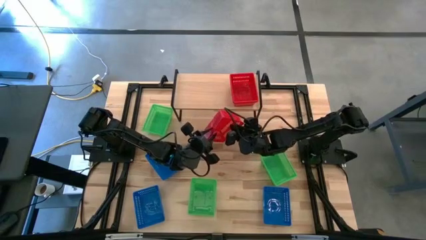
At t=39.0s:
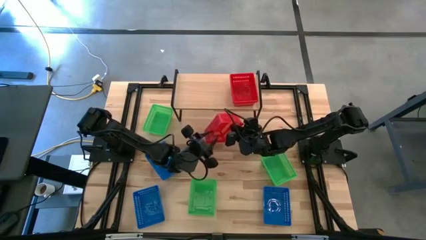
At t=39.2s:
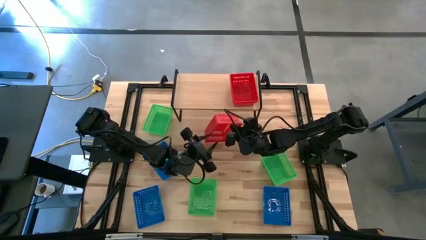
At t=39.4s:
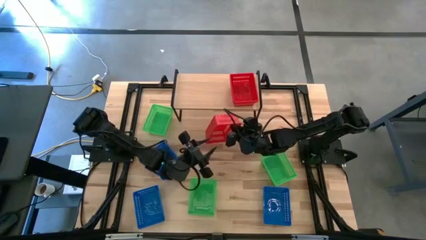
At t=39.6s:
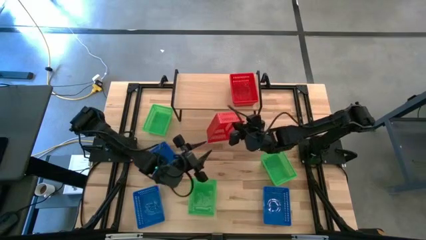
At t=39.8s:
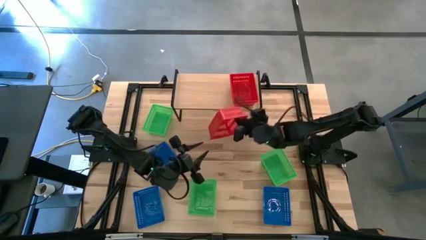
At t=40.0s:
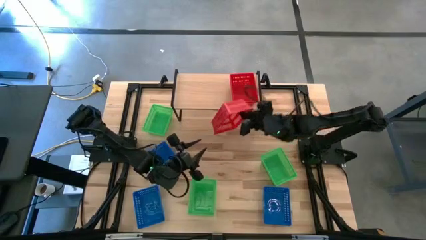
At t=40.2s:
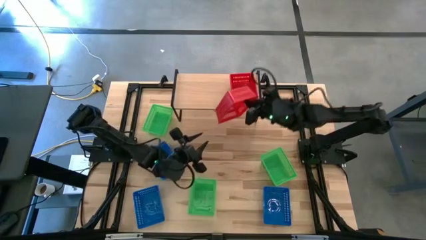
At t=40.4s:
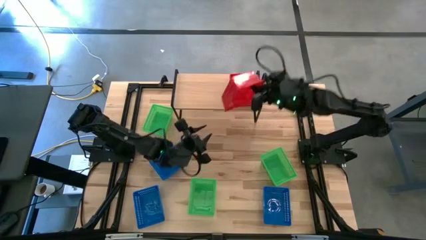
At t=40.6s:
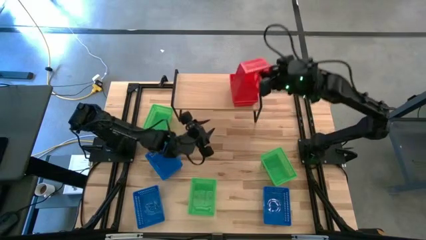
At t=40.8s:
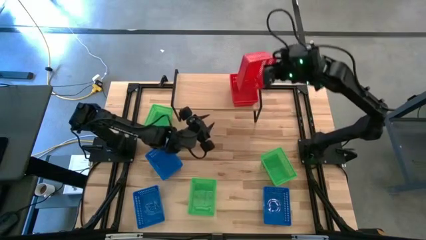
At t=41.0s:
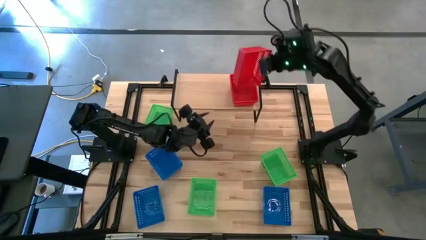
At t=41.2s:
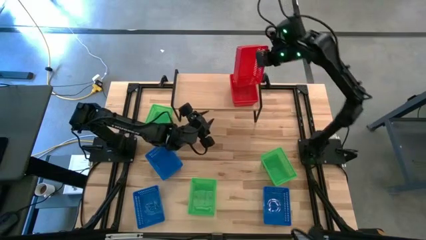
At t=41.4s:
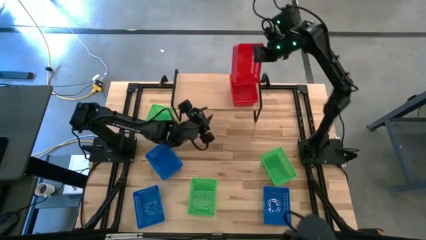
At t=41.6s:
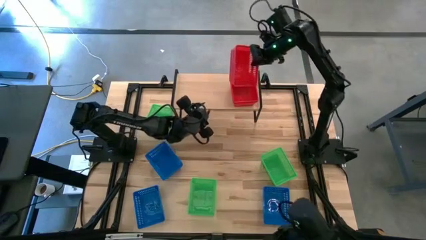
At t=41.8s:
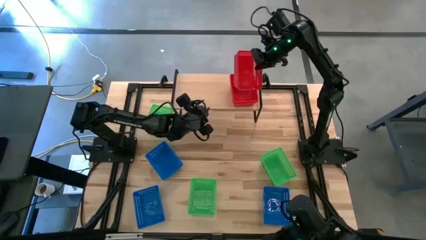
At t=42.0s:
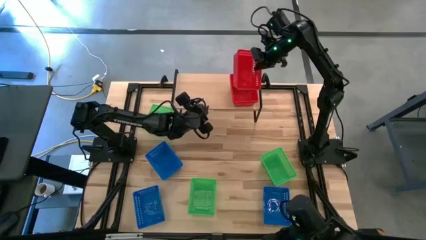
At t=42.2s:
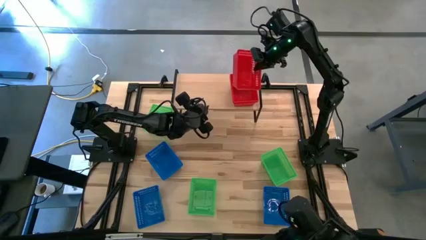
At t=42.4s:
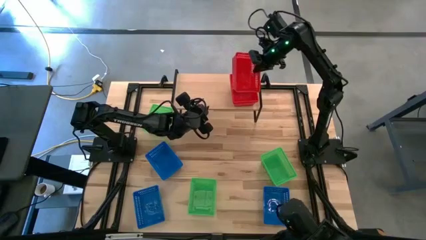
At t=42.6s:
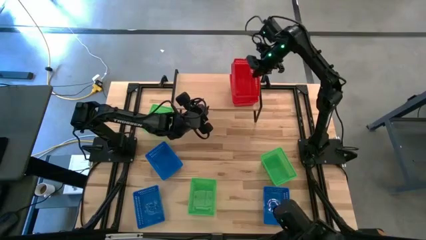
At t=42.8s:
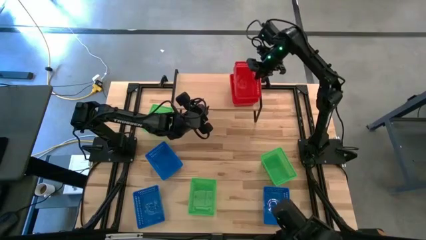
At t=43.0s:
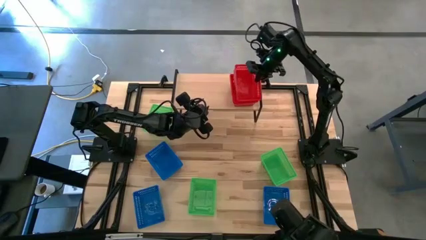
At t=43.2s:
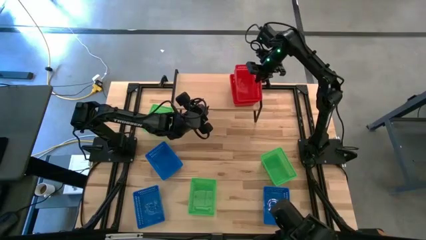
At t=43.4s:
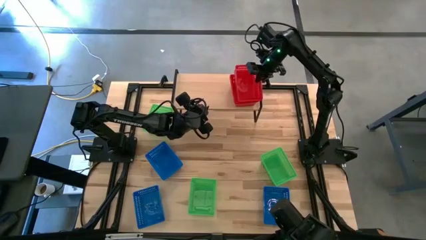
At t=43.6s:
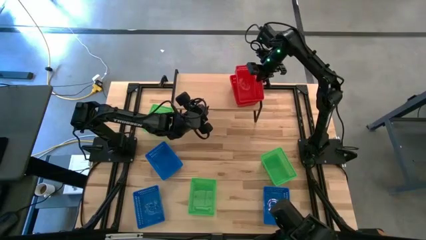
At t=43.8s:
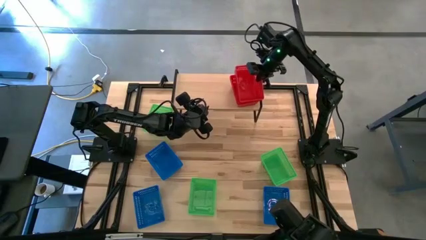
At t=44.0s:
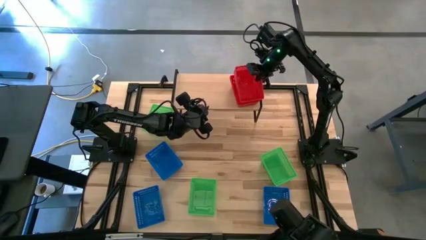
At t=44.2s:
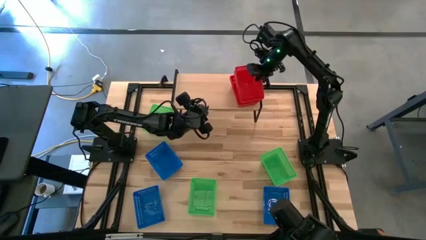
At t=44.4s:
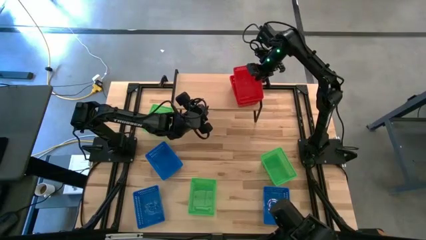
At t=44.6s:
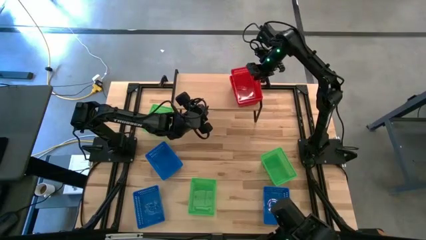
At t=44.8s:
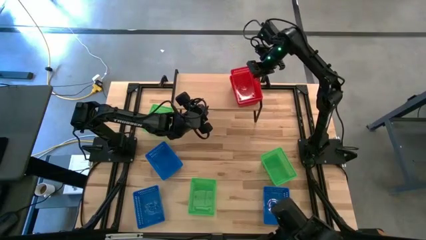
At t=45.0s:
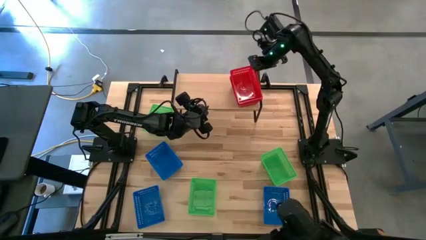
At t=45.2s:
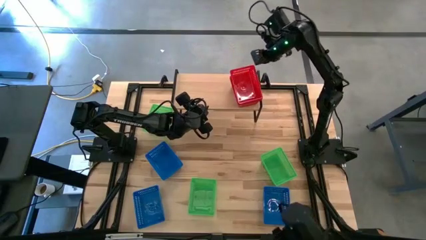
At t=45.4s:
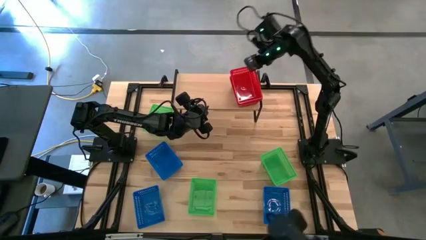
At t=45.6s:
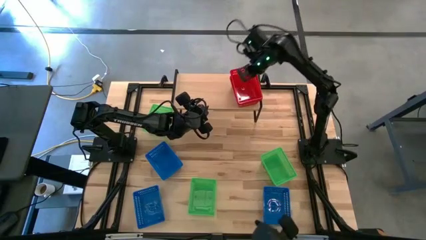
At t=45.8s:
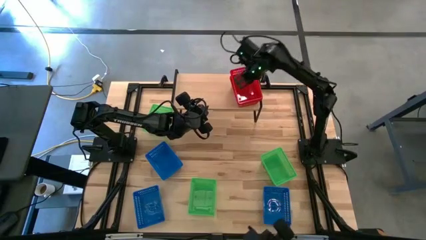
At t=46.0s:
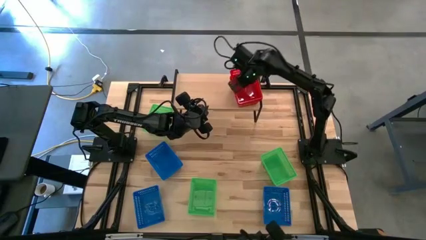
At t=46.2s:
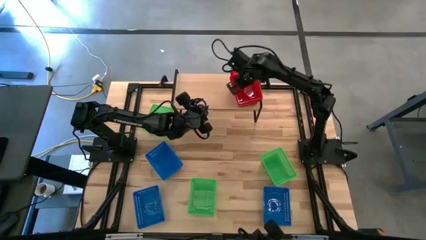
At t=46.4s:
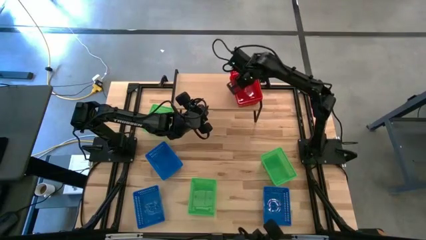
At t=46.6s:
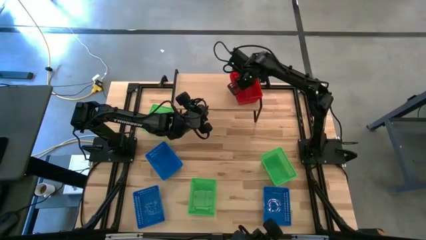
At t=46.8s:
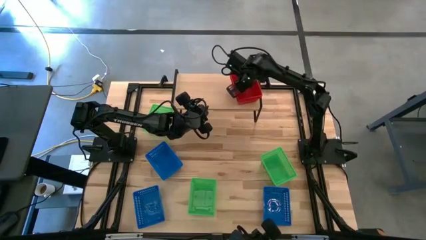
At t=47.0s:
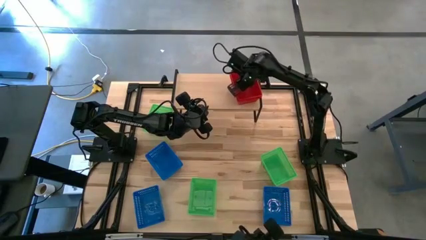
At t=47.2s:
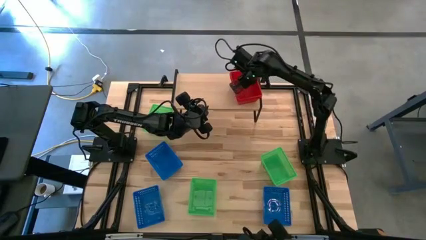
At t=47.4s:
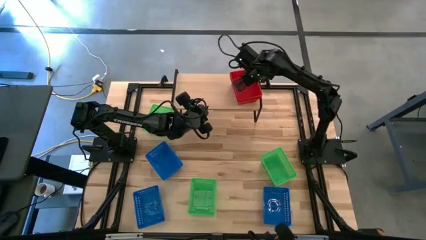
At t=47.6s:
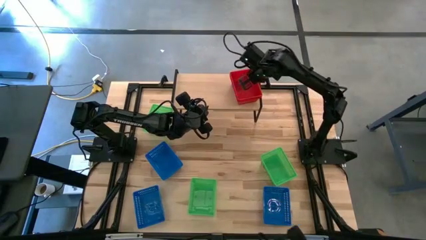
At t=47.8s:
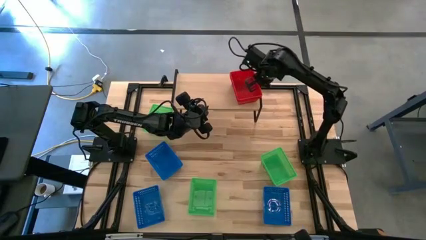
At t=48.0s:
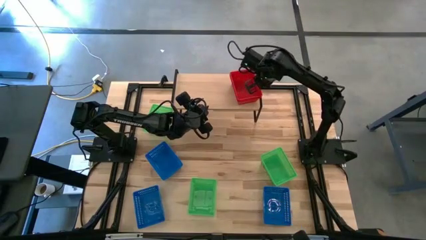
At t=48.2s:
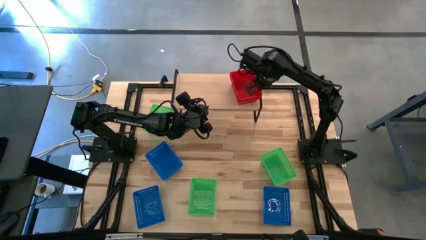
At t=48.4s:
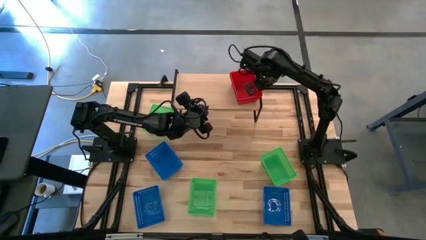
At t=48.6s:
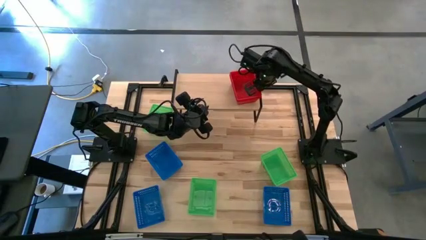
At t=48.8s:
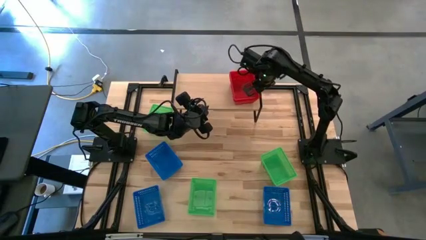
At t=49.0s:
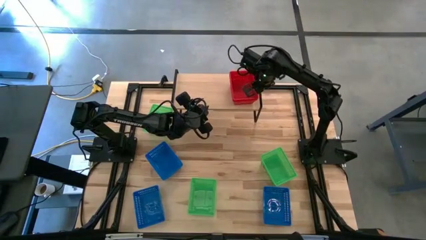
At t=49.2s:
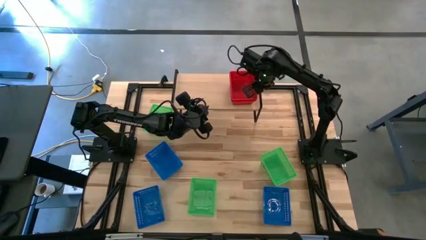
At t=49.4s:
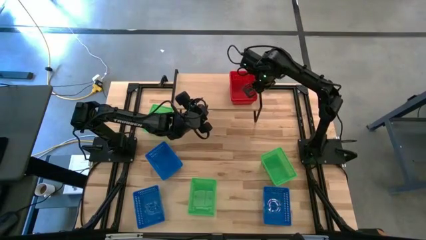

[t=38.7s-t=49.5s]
Task: Stack baskets on shelf by color
Stack the red basket on top of the stacked red baskets on the shelf
